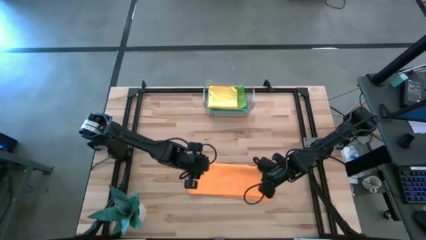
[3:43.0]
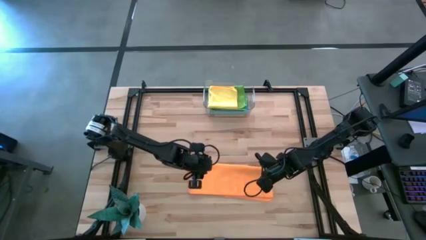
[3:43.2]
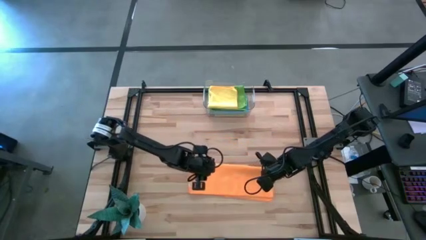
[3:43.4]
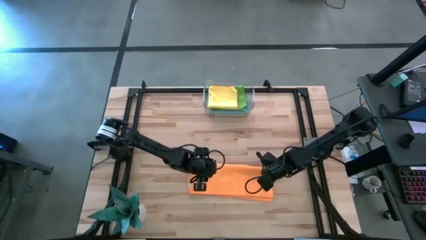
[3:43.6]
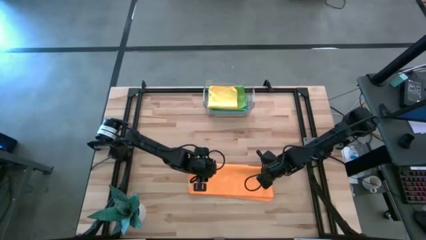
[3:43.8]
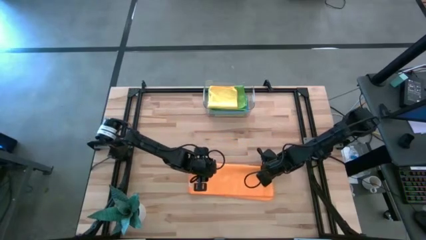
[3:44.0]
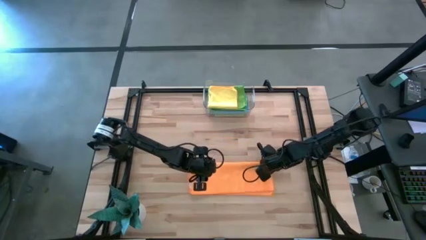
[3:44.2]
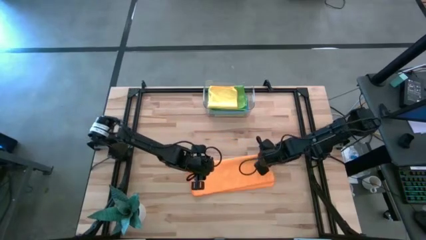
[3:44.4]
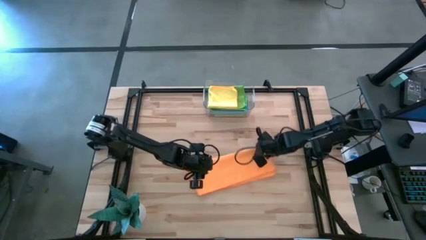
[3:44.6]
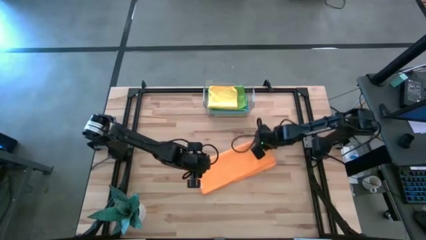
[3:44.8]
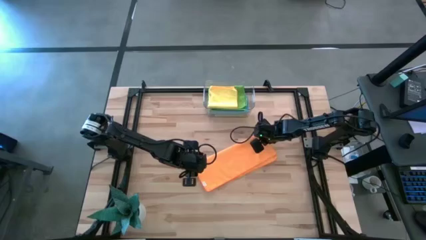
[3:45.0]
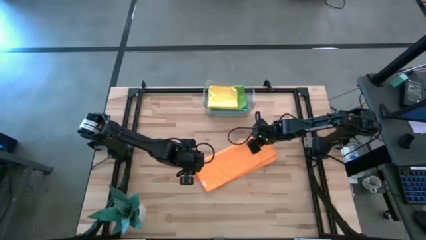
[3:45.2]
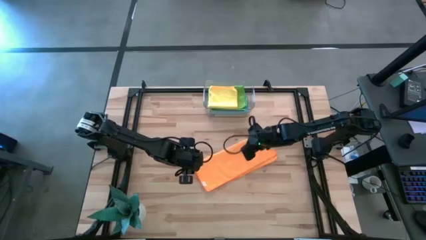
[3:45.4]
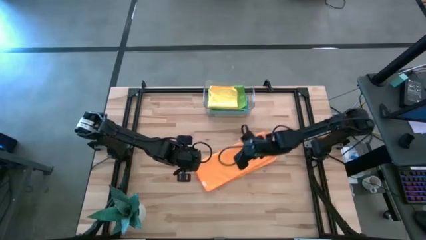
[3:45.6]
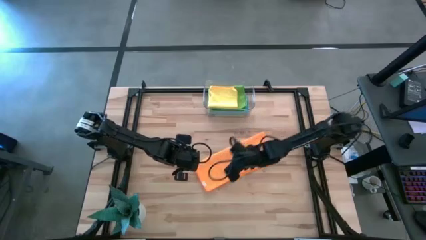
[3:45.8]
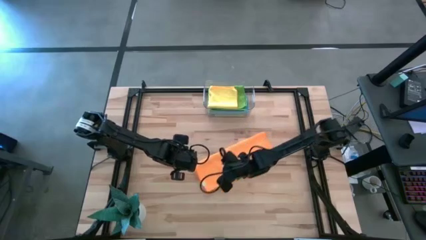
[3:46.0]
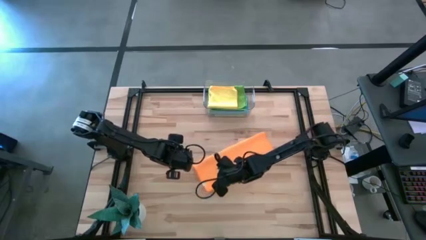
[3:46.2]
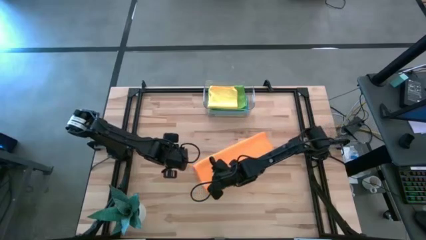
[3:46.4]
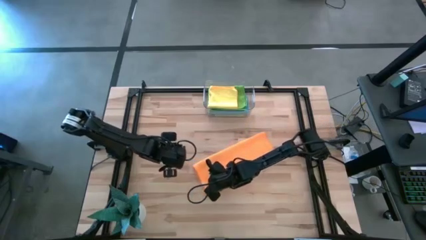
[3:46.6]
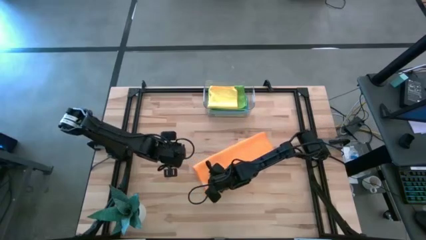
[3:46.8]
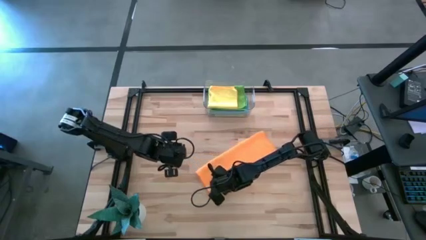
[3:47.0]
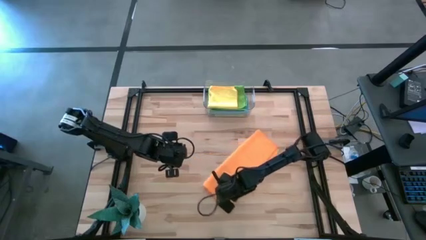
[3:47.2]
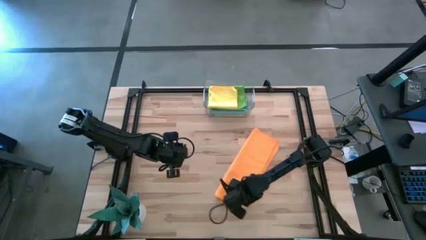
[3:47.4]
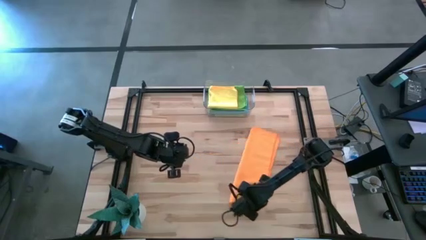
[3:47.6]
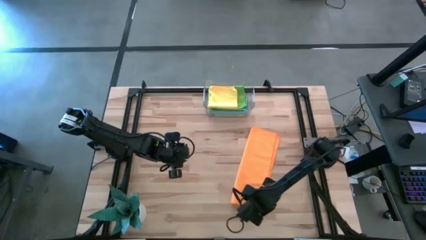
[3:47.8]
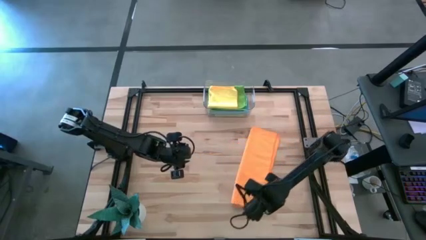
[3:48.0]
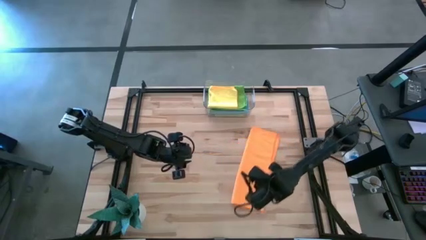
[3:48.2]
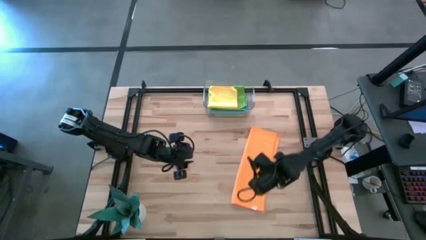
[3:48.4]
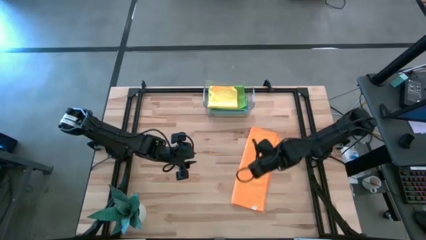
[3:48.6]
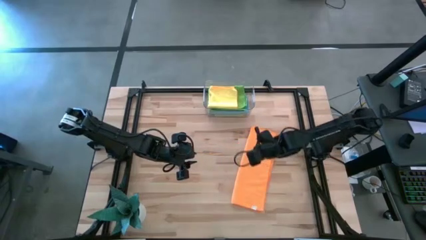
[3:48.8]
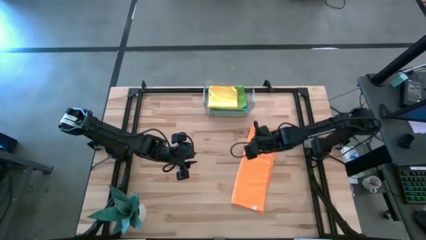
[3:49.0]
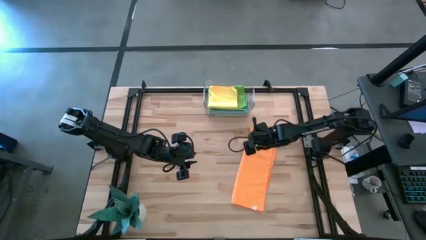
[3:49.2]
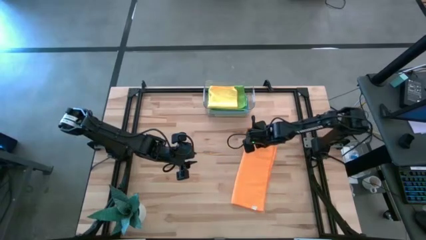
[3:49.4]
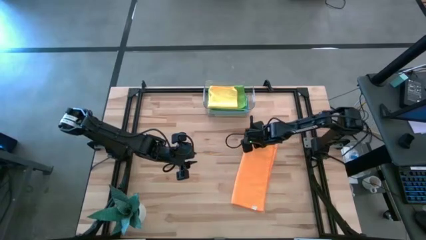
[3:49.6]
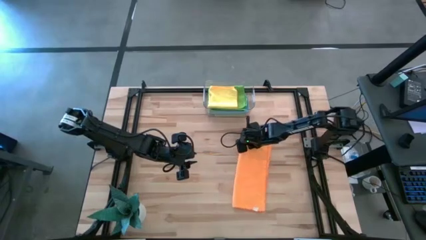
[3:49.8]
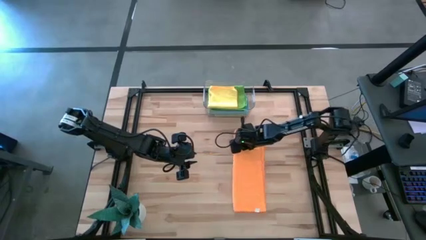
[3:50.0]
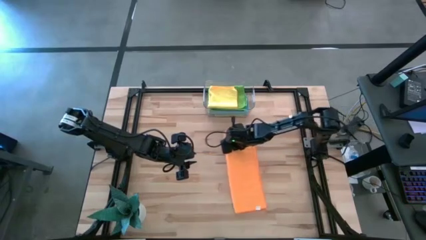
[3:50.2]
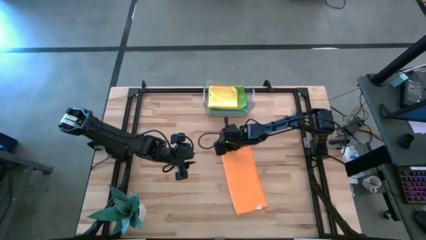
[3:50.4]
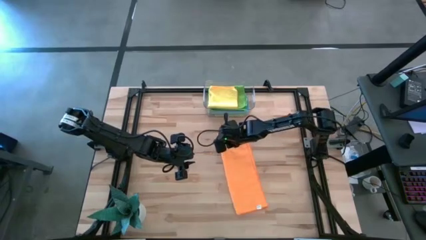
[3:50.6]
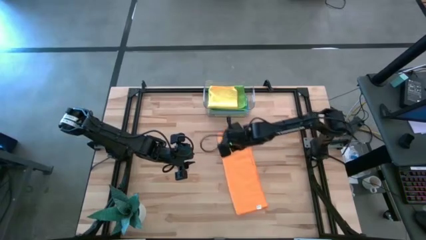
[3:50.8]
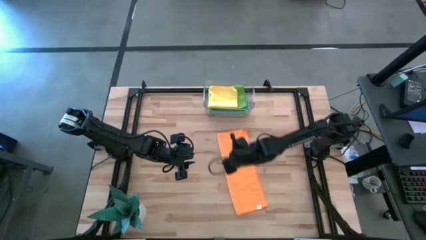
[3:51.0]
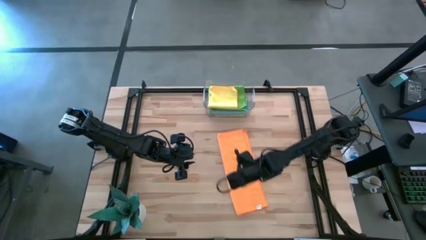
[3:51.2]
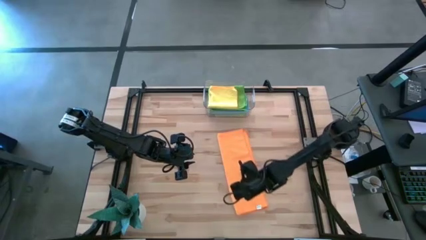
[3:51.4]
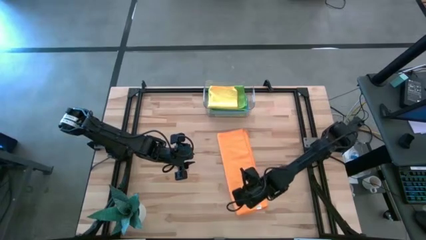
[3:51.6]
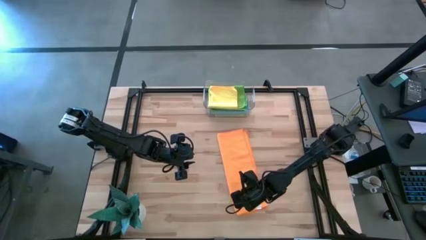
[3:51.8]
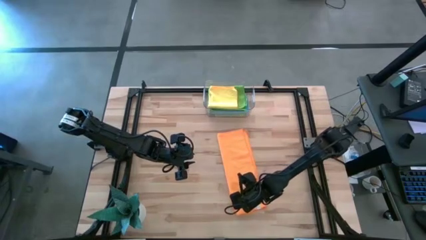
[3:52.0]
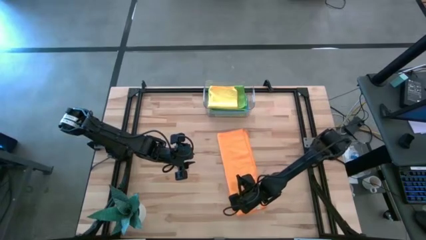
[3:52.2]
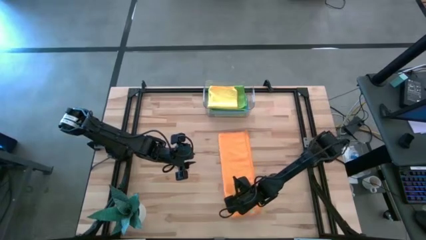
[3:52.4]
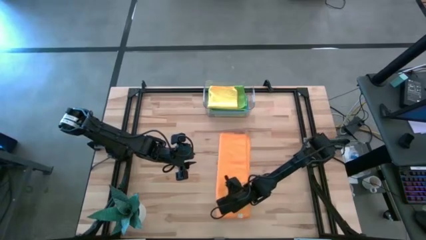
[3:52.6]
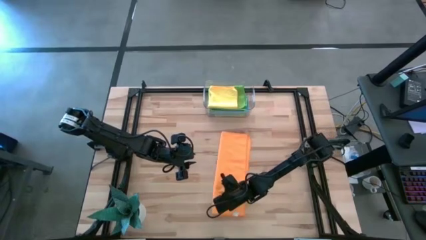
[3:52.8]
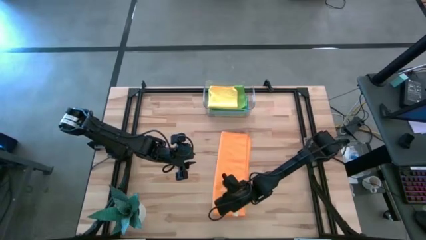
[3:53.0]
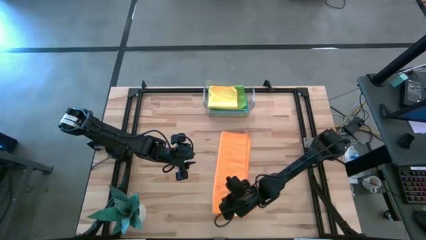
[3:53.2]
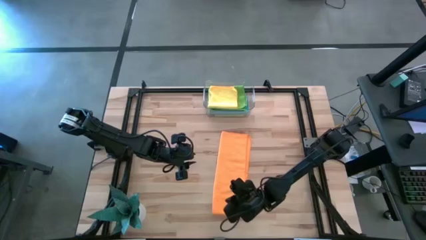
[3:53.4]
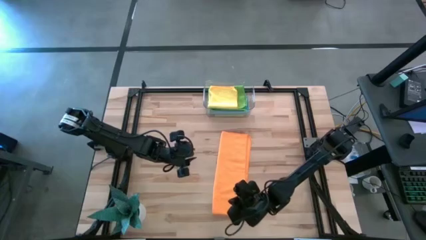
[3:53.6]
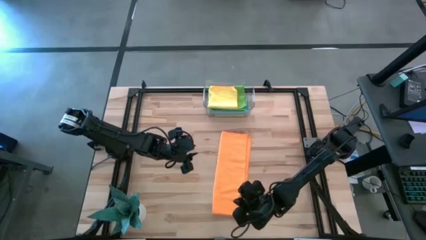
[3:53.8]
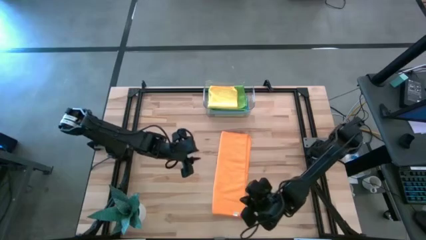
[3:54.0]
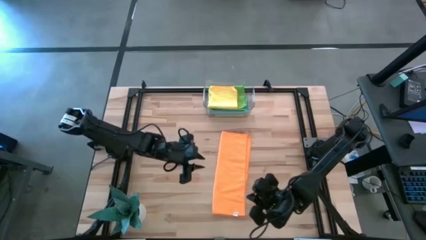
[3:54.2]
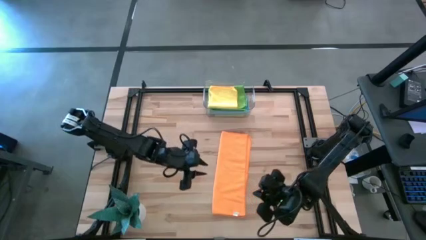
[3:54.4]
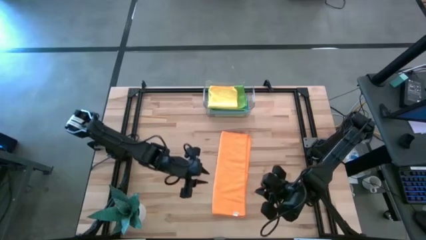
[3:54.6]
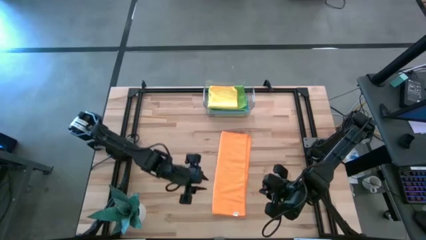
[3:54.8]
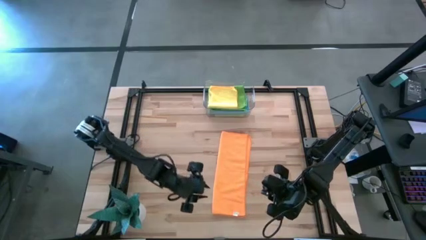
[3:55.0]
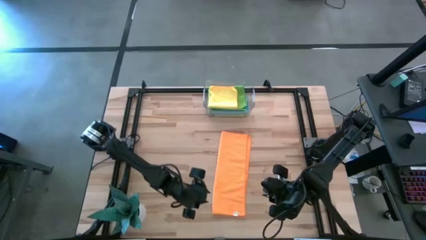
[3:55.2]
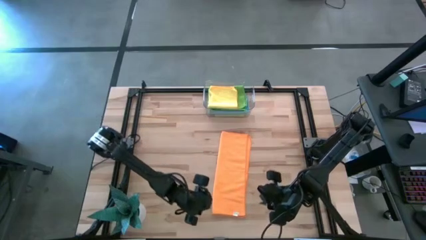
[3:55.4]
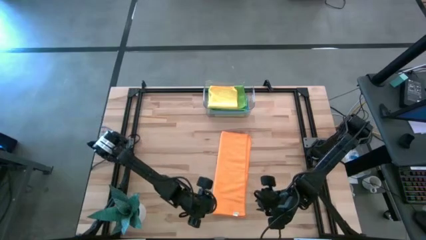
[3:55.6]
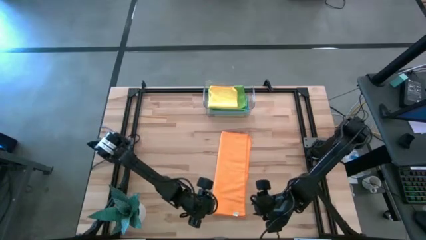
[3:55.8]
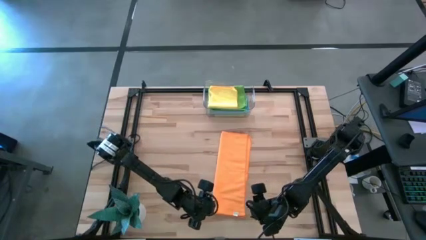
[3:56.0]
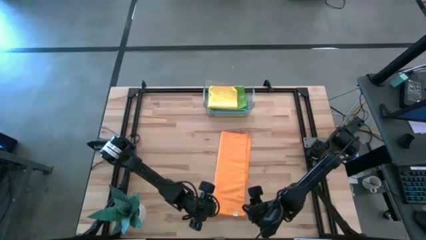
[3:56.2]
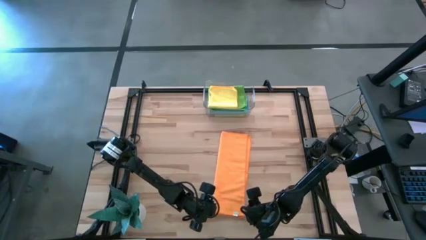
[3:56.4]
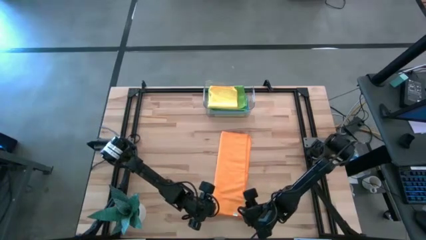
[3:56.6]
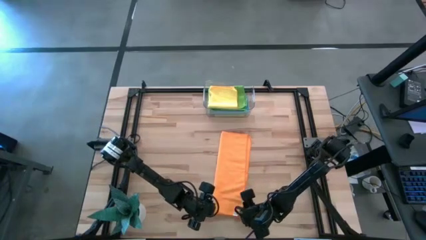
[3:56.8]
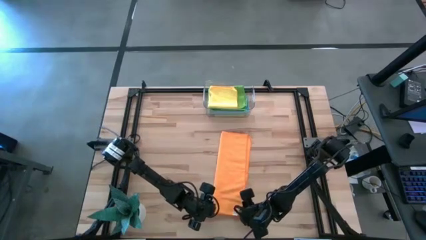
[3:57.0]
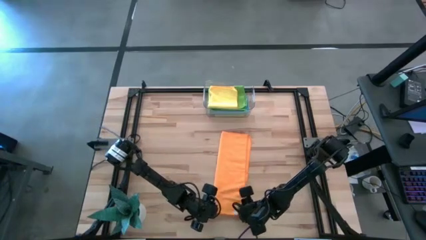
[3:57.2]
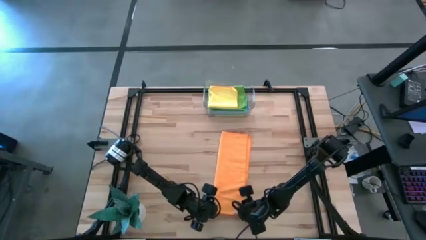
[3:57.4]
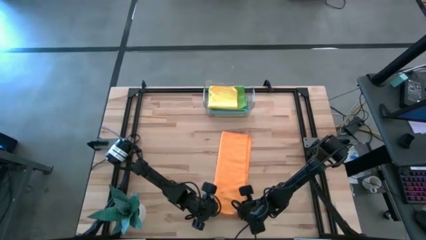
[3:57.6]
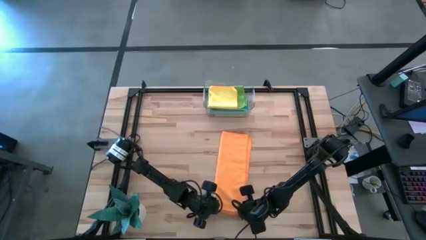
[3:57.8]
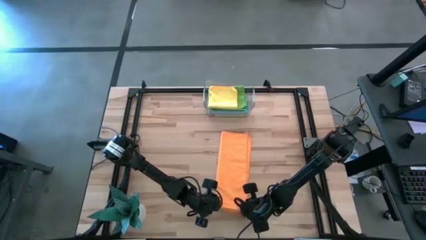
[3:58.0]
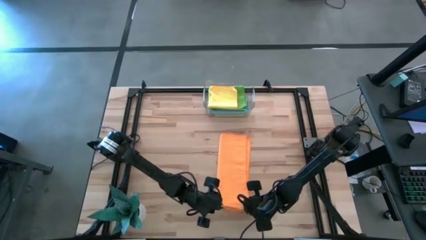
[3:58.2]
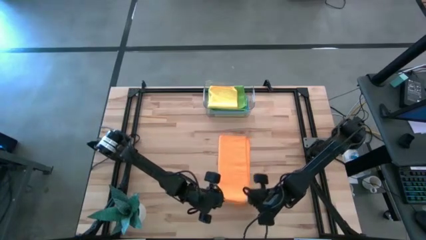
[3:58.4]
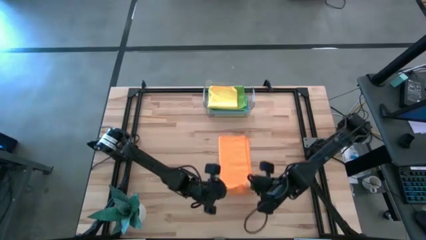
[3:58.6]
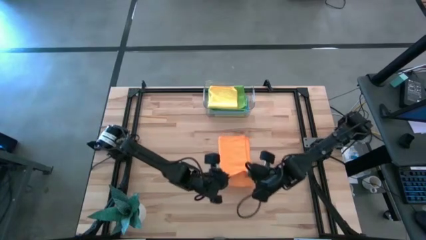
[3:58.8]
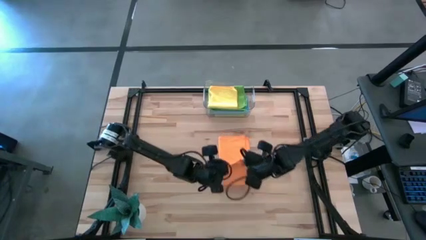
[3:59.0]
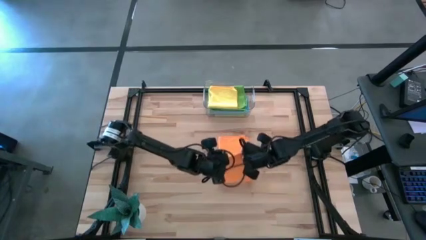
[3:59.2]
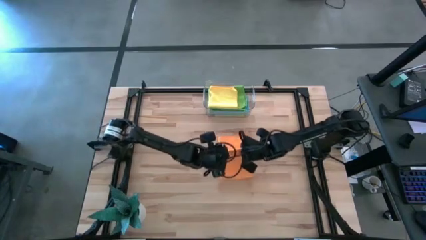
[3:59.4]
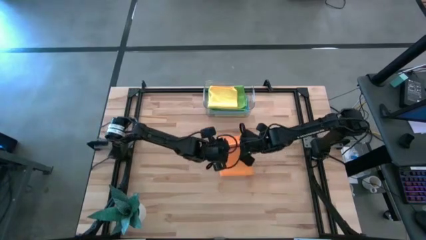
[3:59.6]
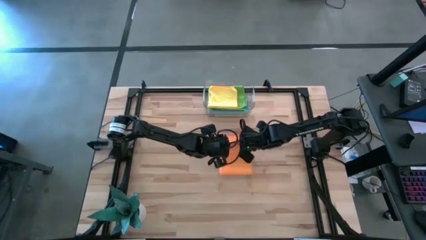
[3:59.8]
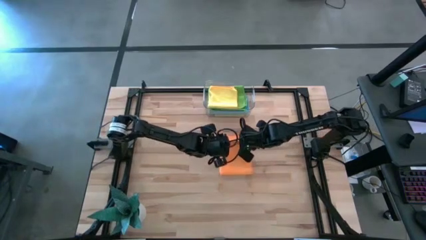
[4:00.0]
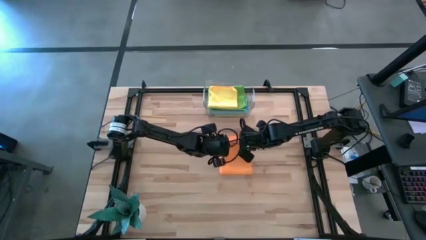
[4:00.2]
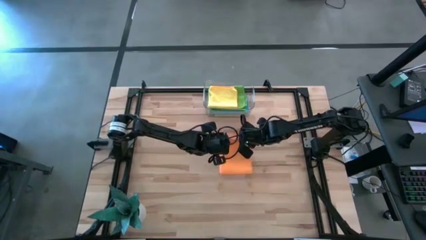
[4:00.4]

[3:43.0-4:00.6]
Task: Fold microfiber towels
Fold the orange microfiber cloth
